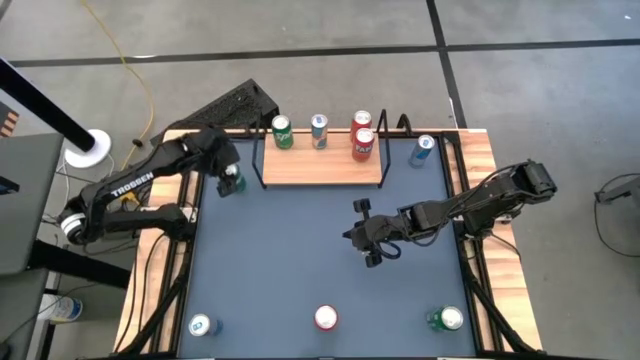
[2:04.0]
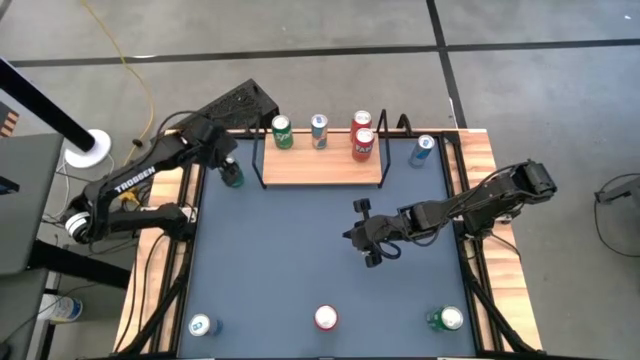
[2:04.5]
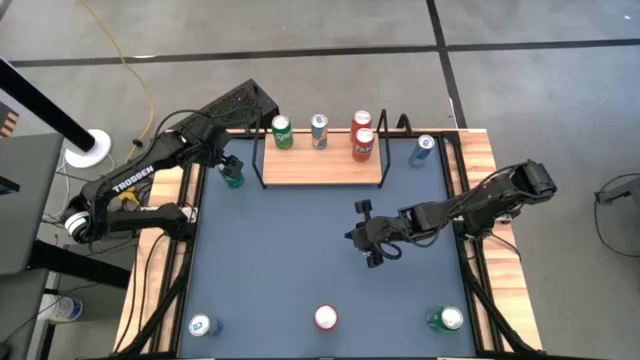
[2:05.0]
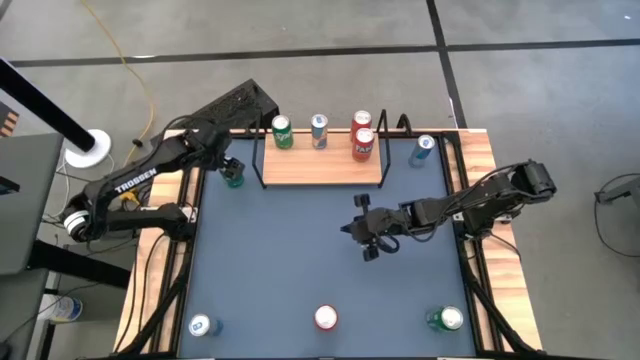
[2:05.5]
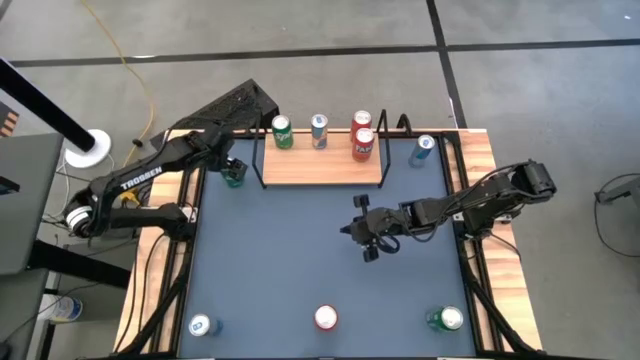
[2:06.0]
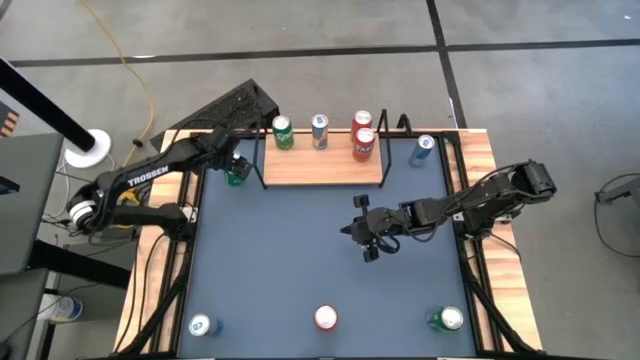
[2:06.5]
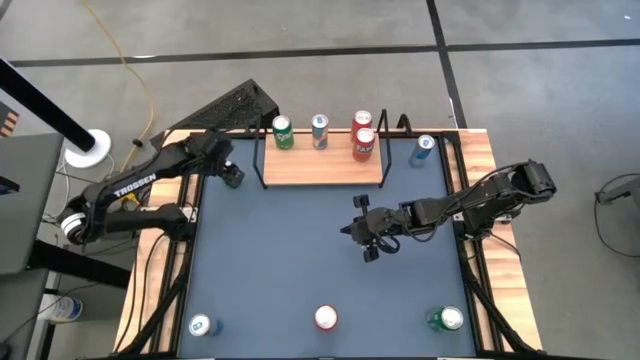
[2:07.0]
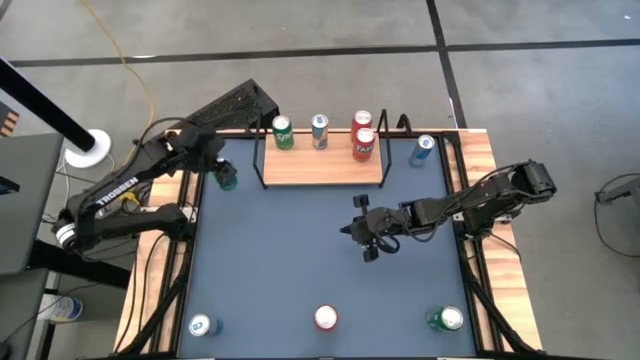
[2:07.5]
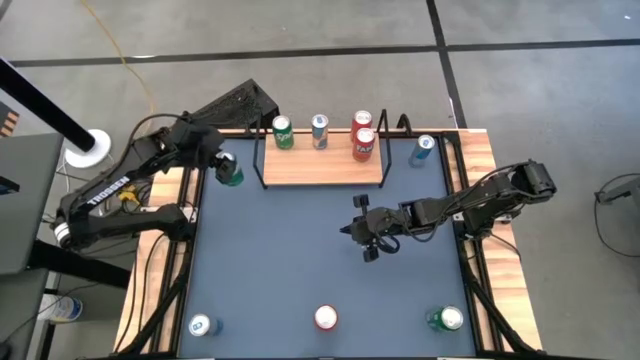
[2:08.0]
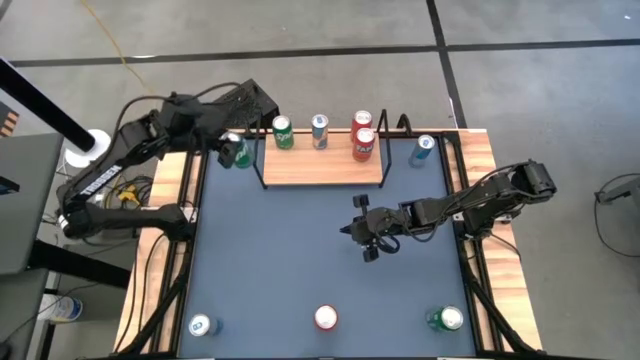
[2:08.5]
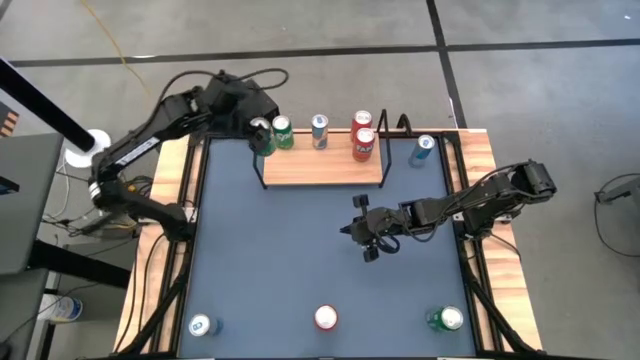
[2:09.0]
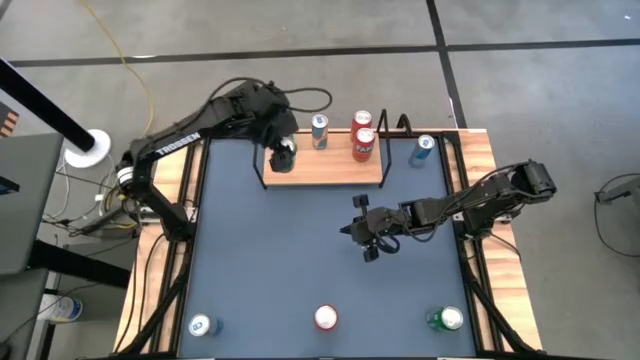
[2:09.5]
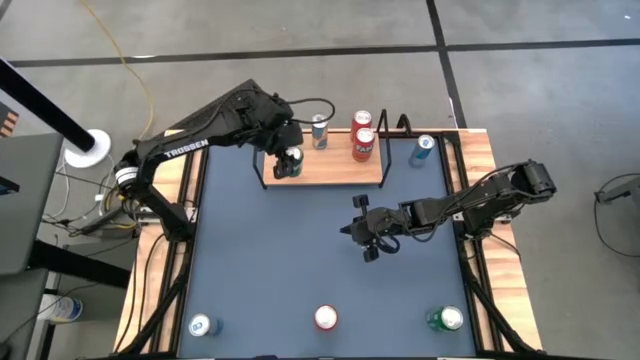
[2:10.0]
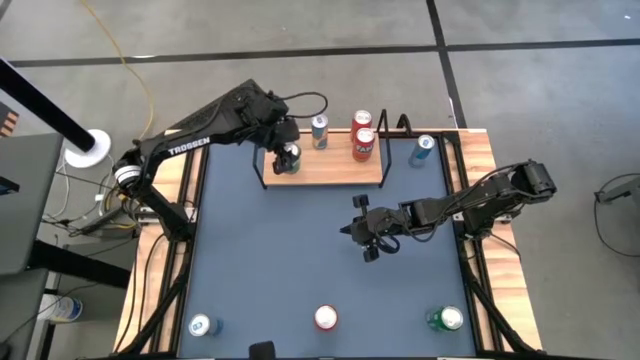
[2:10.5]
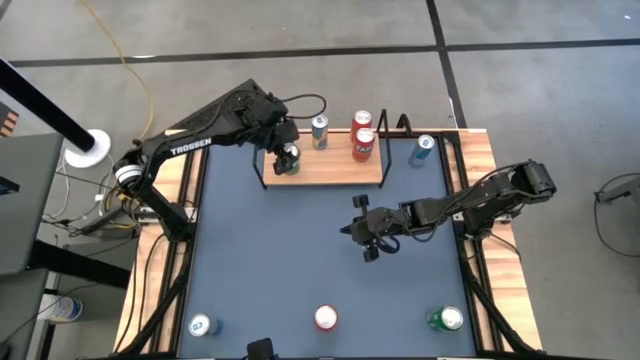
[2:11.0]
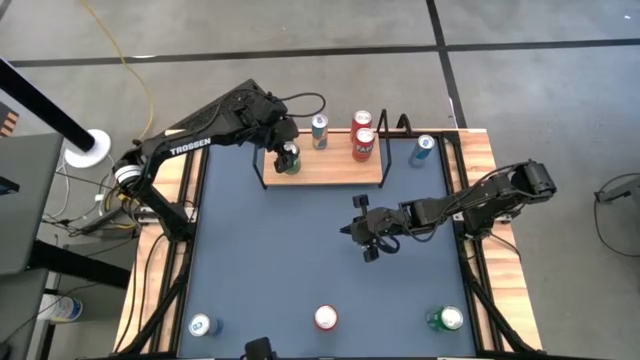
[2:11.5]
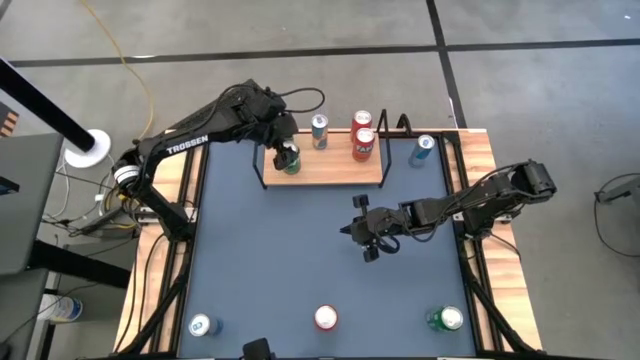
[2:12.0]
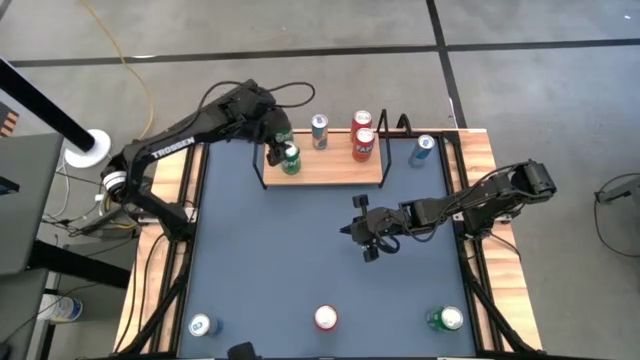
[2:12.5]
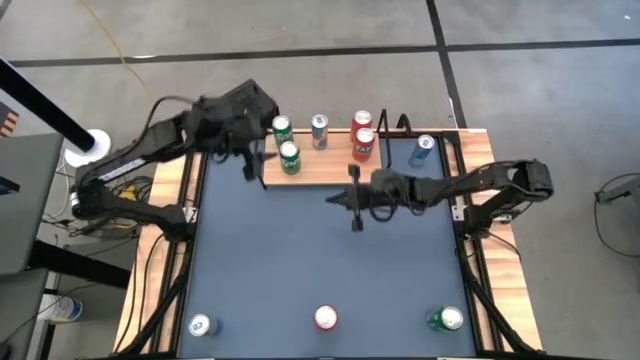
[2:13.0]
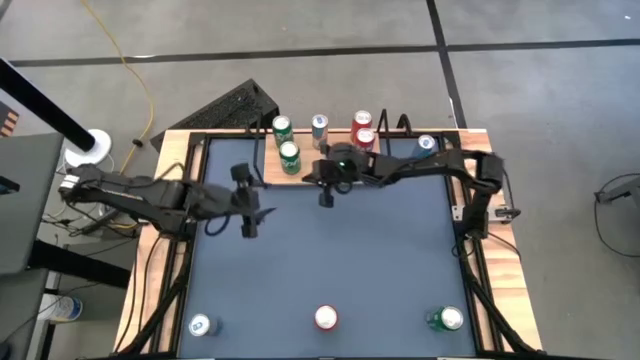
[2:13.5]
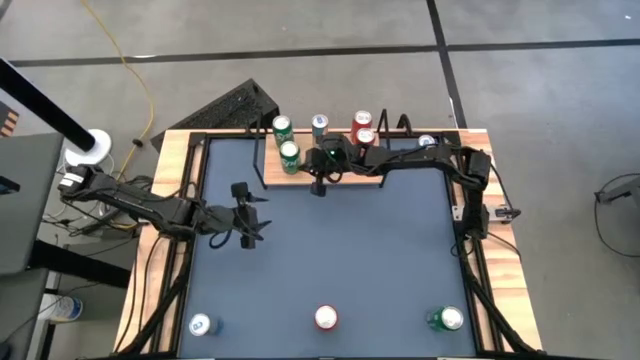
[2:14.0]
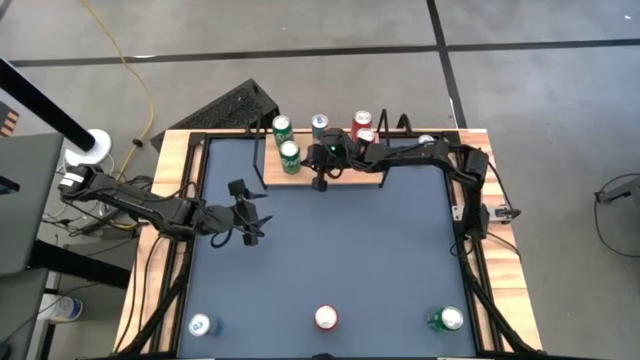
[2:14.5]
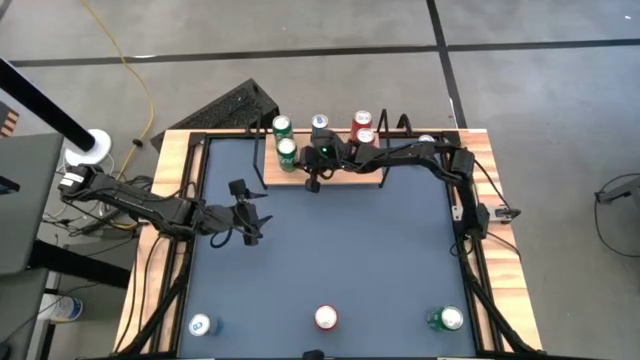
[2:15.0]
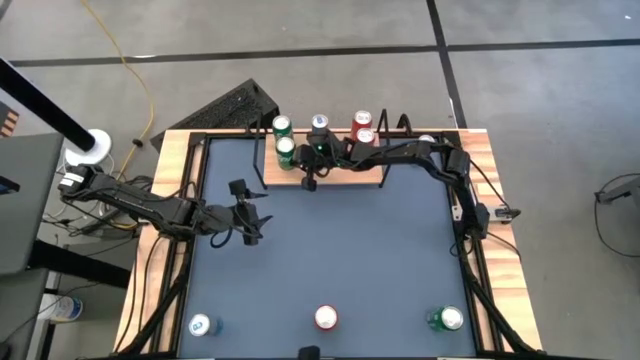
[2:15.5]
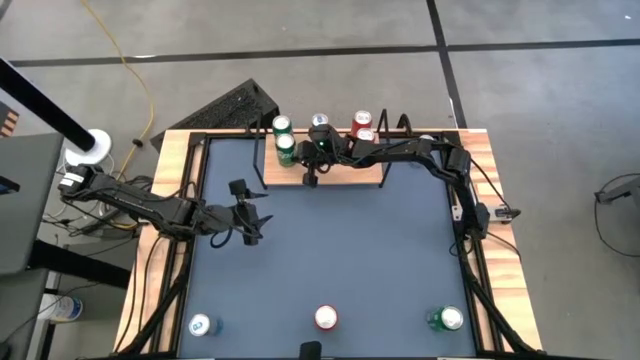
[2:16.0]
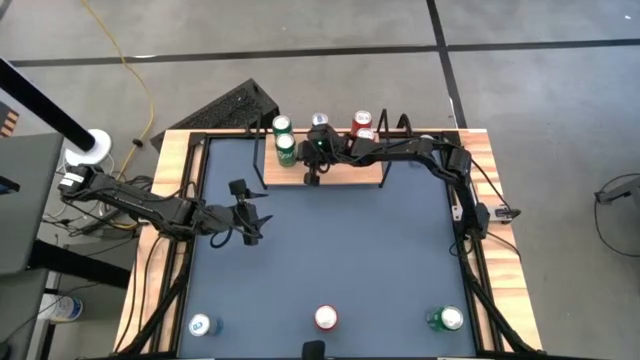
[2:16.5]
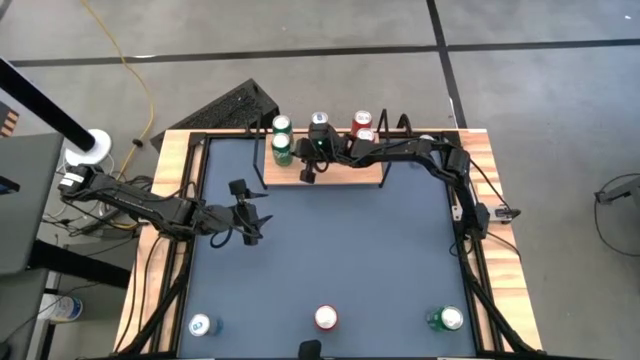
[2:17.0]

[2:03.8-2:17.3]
Task: Place canned beverage on shelf
Put the top green soda can on the shelf aligned with the other green soda can

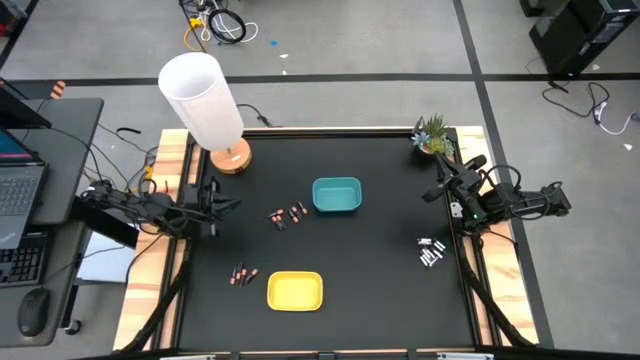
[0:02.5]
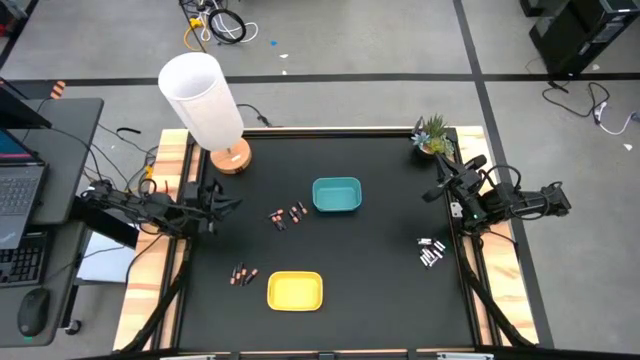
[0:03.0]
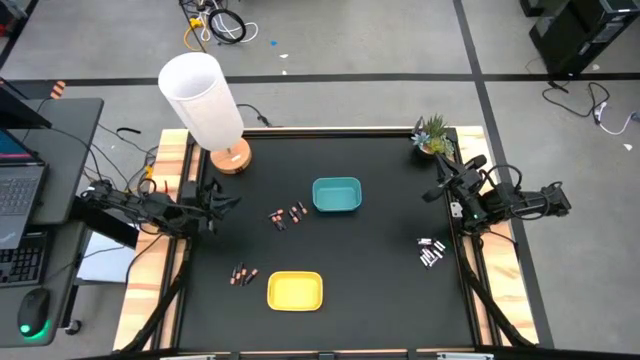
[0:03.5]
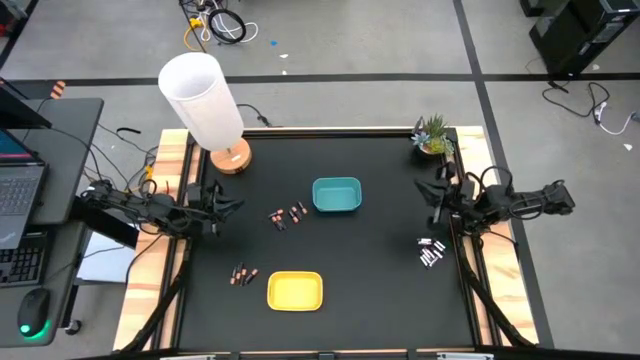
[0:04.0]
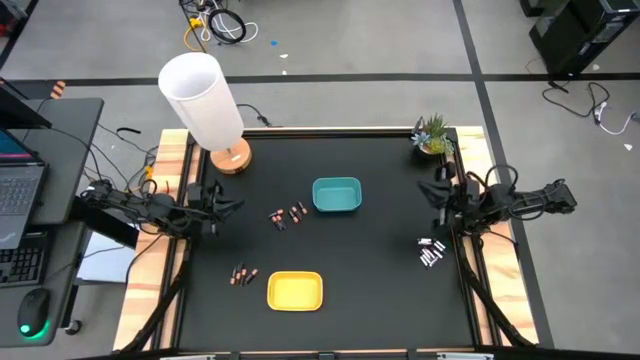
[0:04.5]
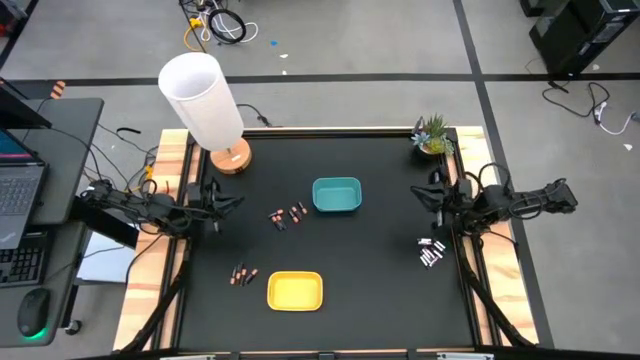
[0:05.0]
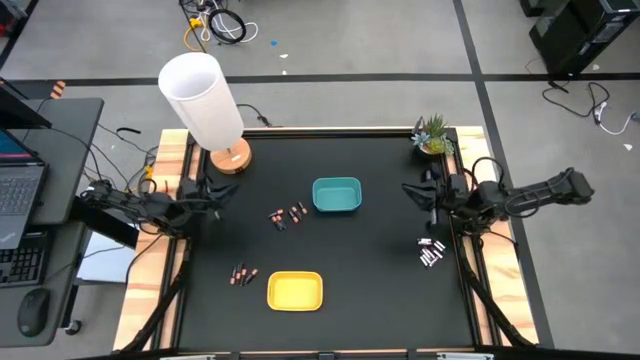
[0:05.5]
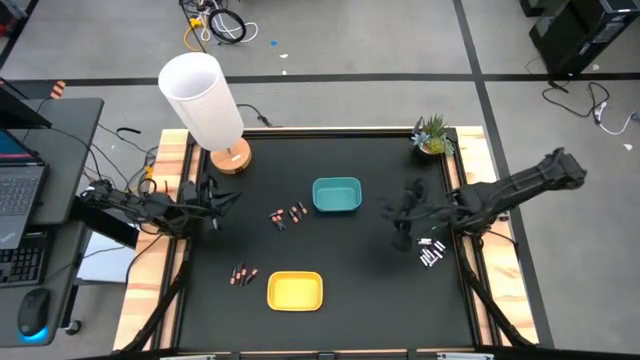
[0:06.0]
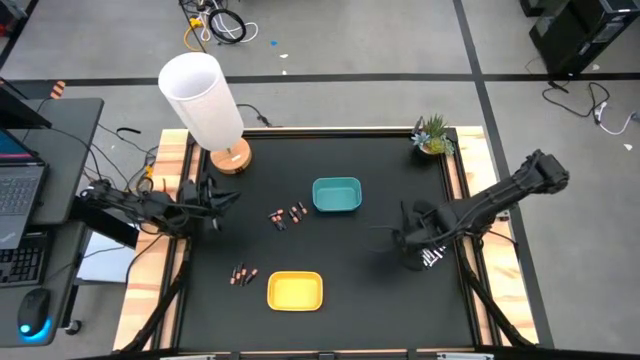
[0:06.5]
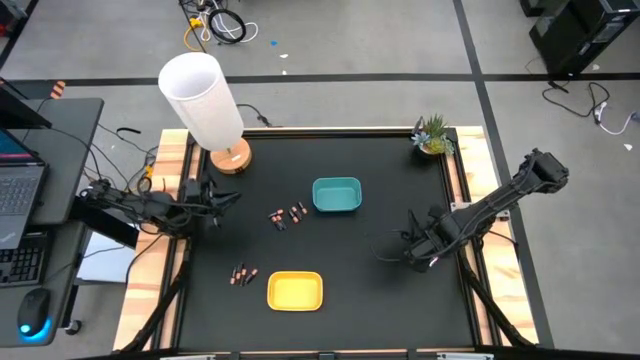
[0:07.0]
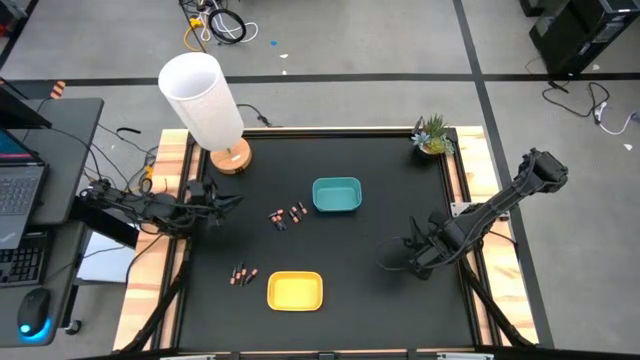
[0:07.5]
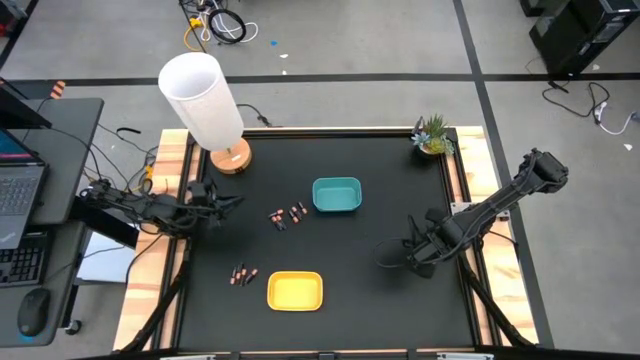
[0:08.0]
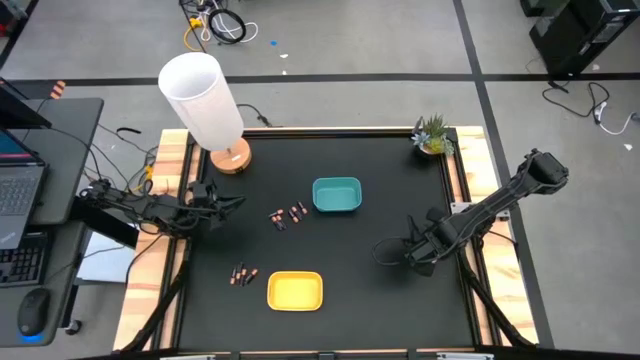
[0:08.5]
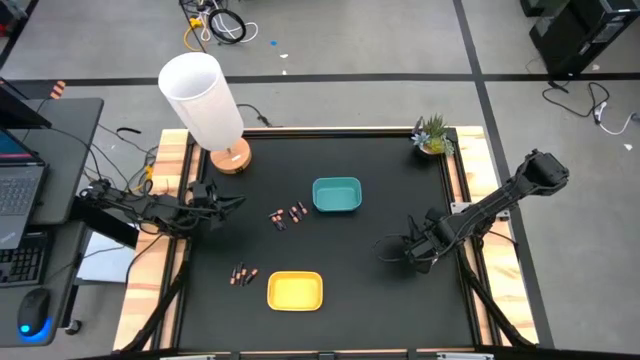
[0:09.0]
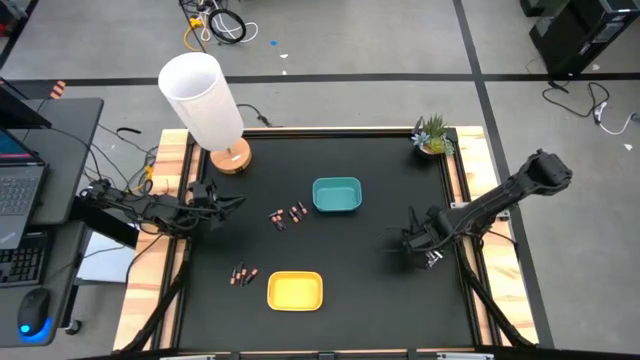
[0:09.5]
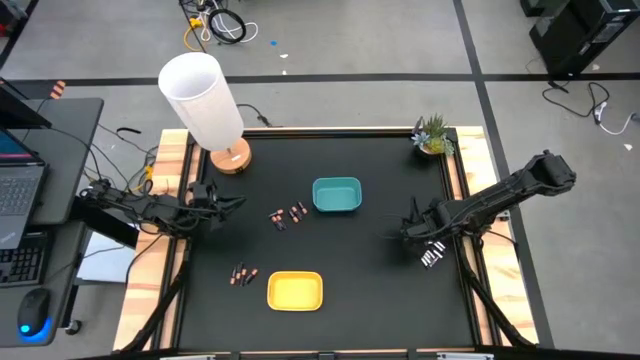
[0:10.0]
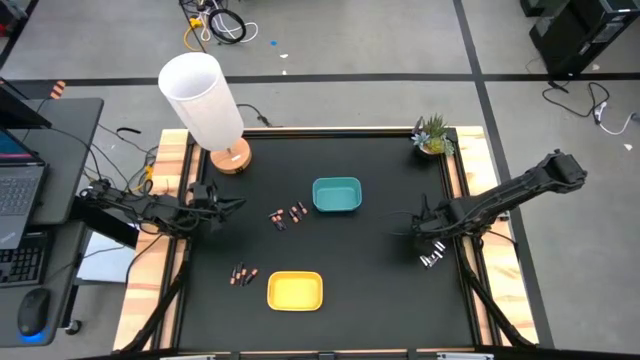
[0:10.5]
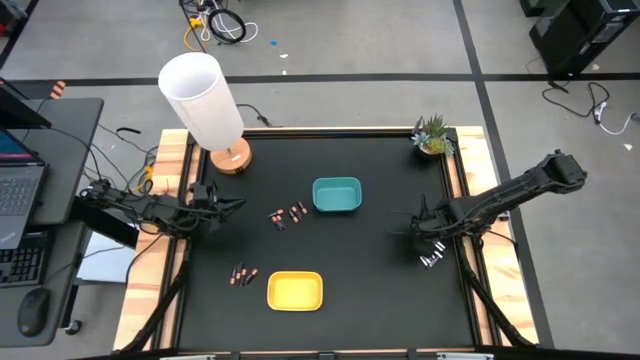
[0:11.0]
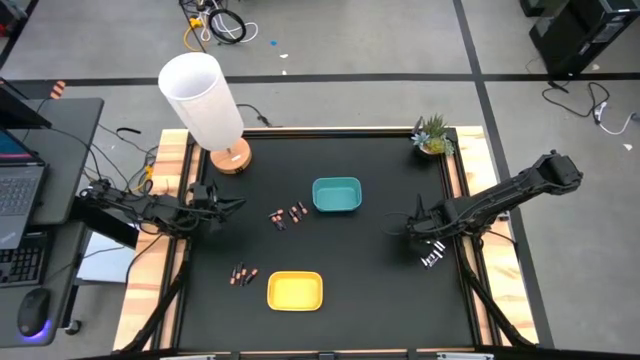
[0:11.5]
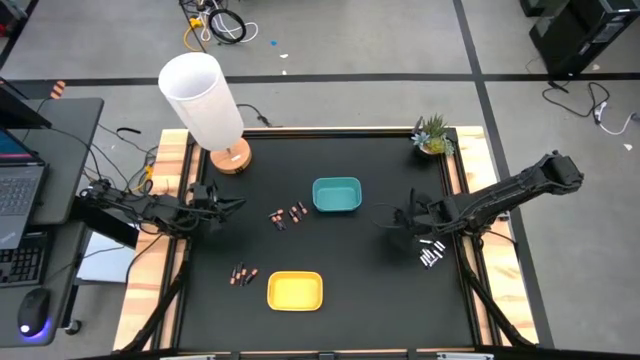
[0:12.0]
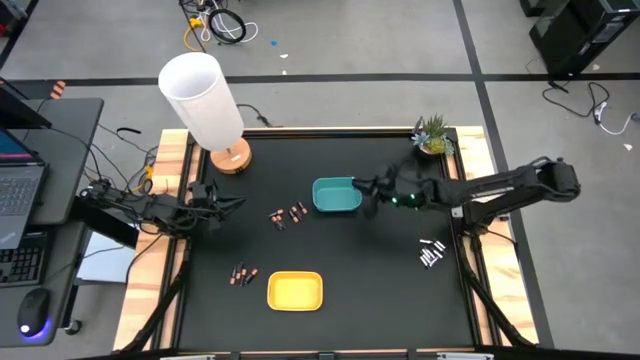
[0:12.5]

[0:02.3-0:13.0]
Task: Sort batteries
Put the silver battery into the blue bin
